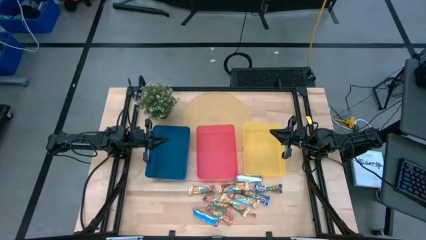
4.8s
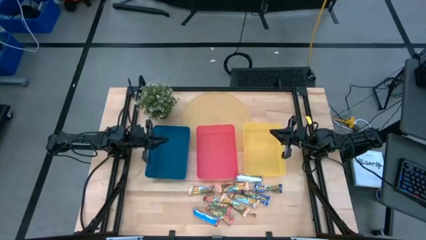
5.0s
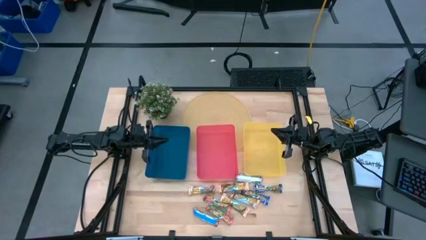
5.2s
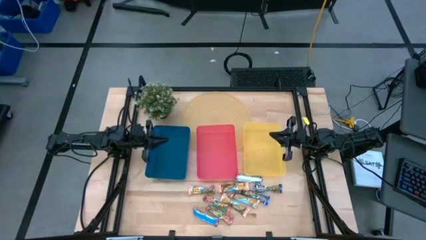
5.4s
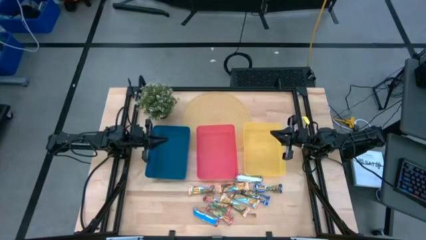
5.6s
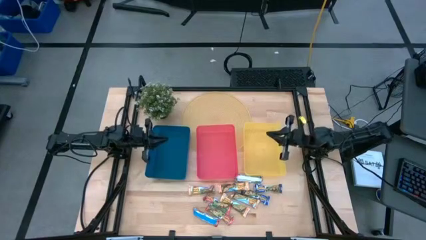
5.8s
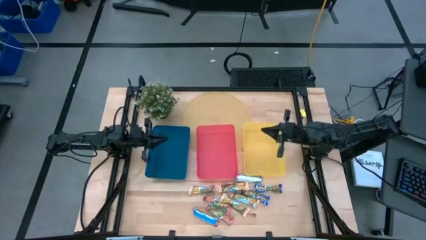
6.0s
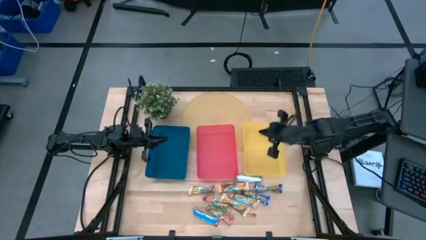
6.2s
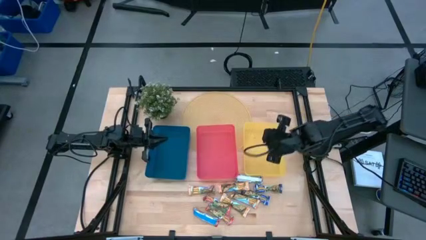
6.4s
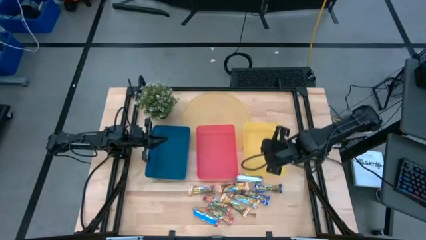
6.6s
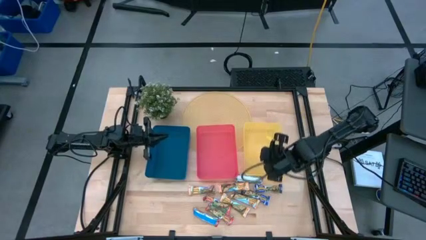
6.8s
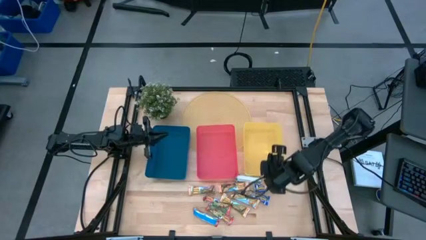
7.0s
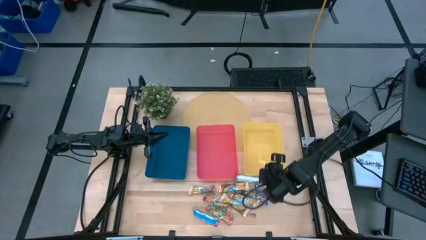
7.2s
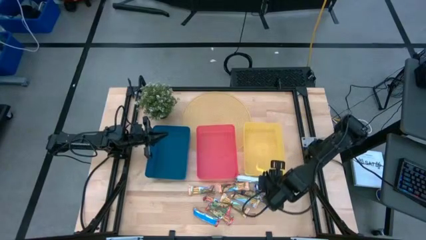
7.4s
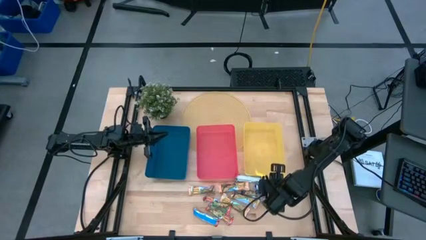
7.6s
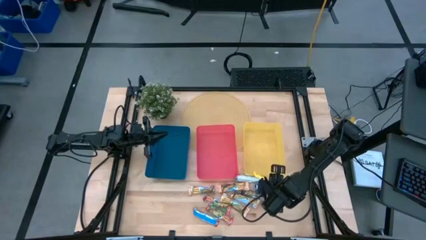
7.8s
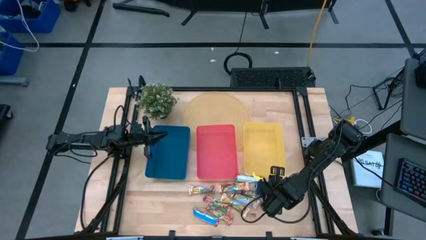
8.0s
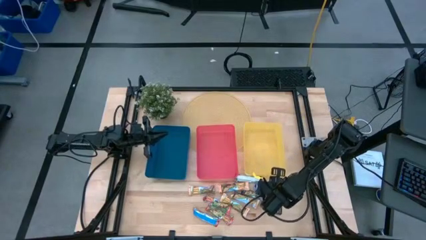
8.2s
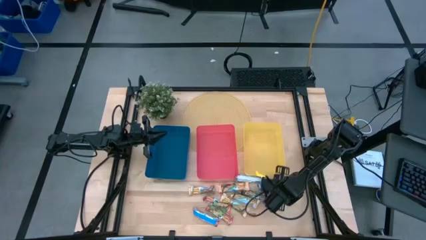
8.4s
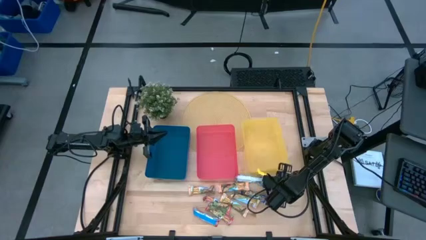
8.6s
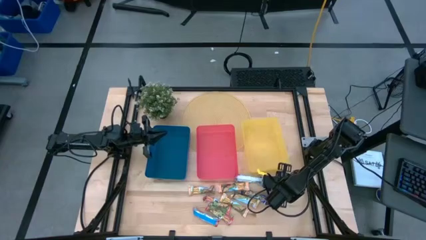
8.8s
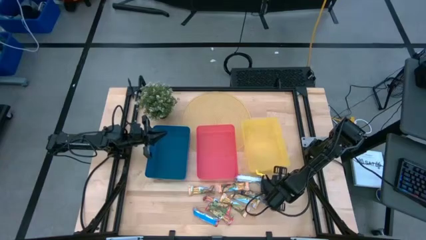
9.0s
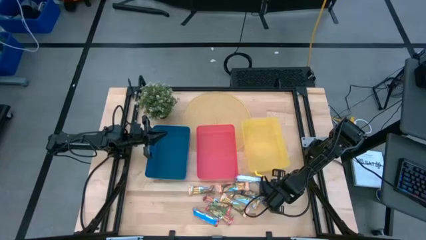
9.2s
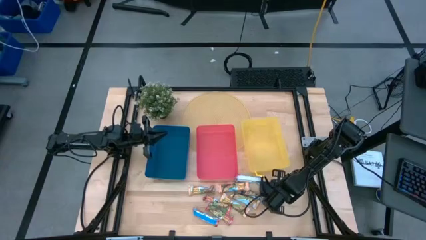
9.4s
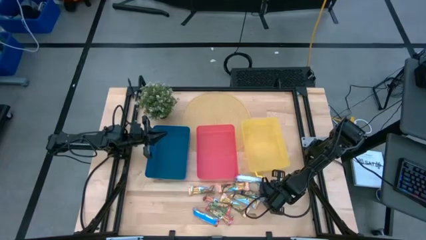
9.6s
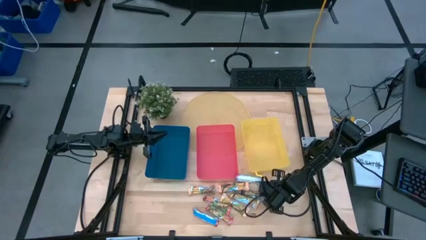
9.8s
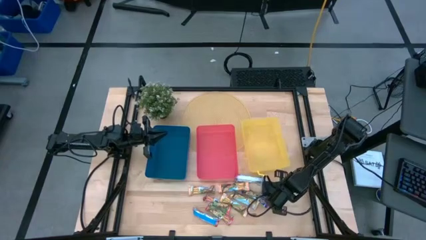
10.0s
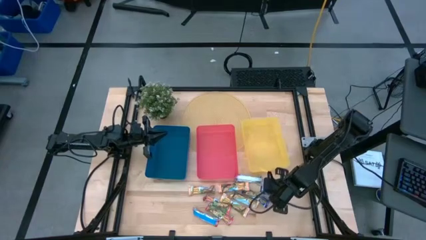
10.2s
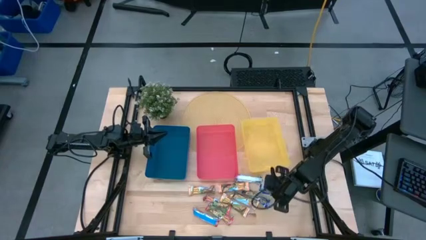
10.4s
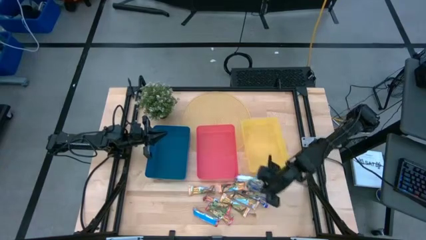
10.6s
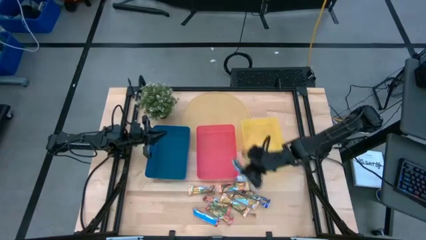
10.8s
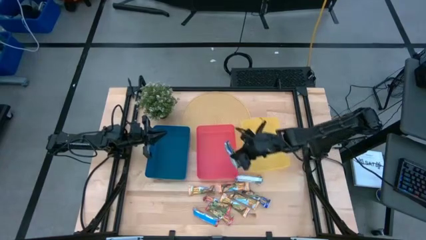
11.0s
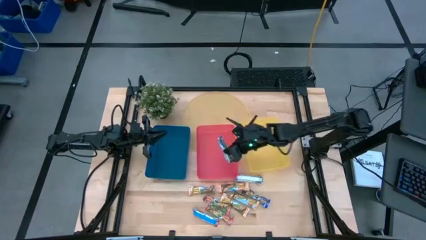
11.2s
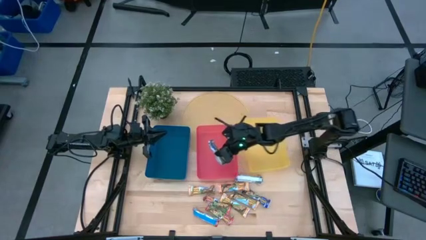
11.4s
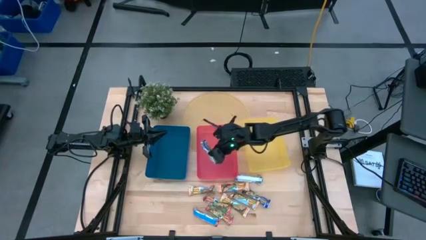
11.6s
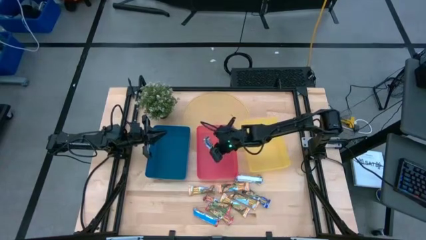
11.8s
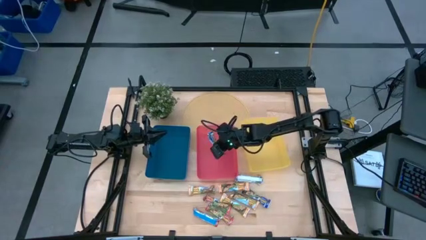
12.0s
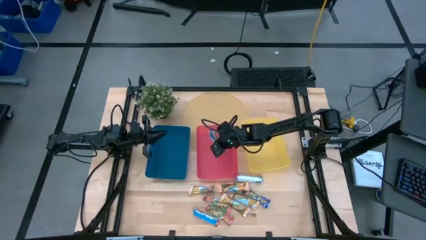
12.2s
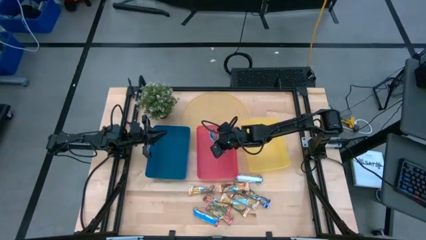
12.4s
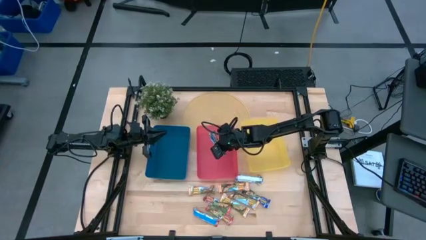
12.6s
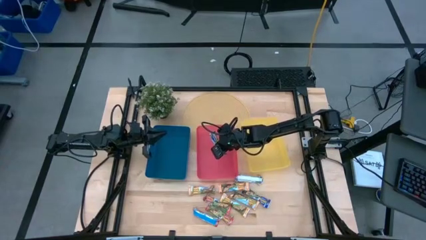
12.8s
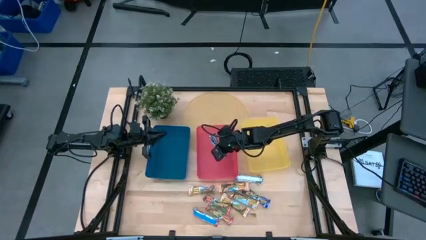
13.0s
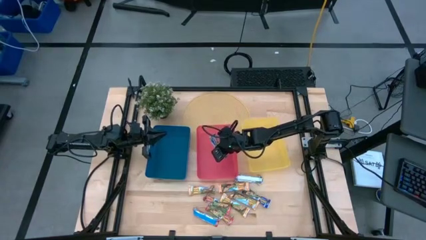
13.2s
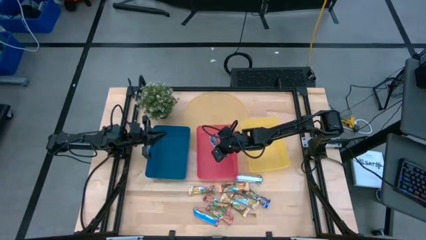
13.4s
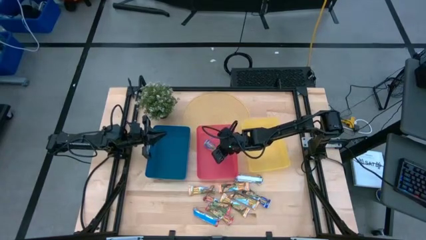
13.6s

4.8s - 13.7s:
Task: Pick and place Granola Bars by type
Put the blue granola bar into the red bin

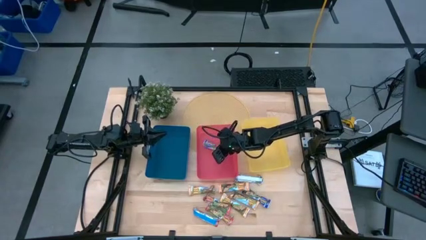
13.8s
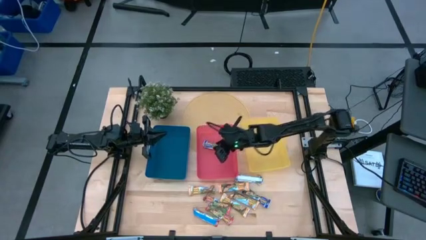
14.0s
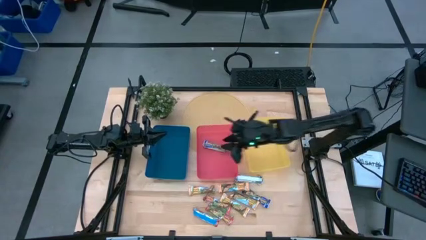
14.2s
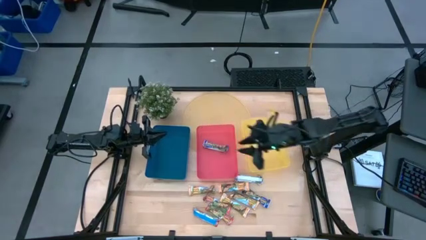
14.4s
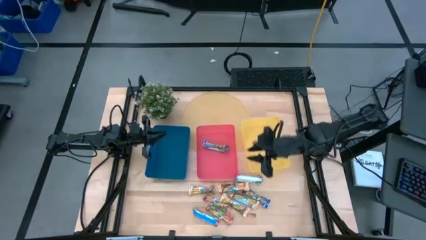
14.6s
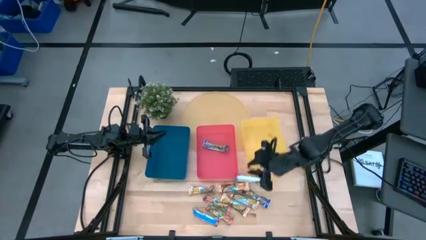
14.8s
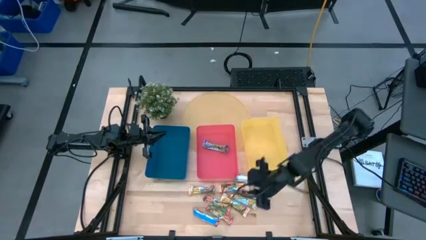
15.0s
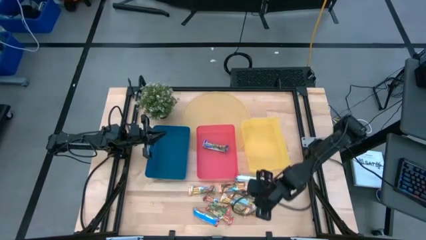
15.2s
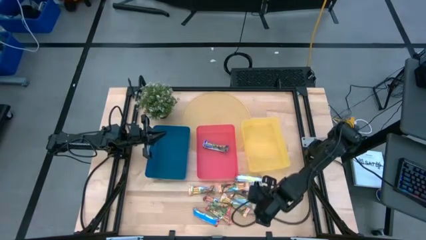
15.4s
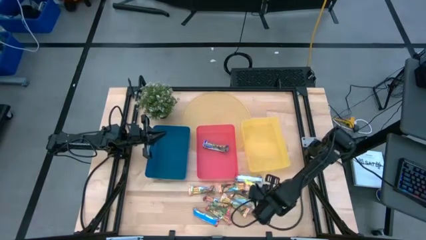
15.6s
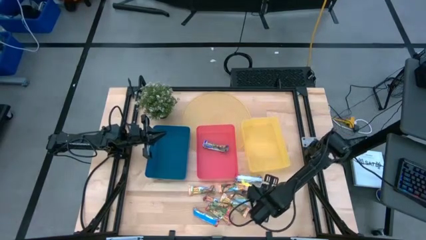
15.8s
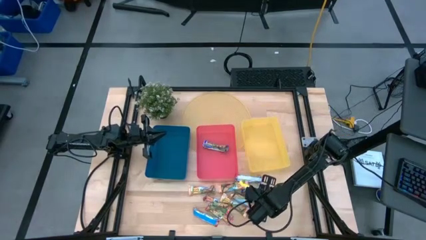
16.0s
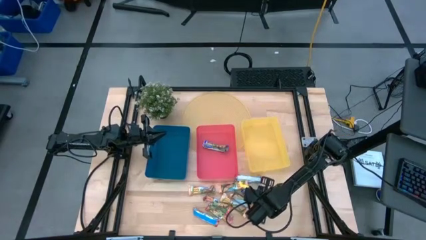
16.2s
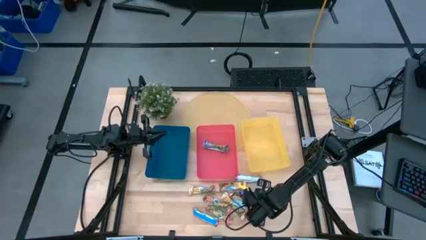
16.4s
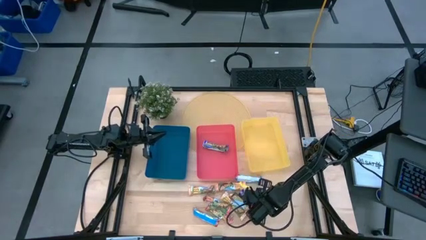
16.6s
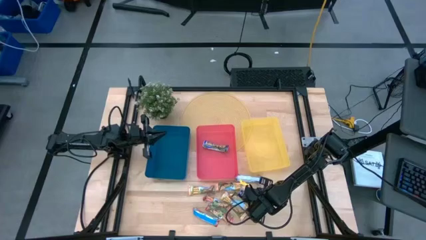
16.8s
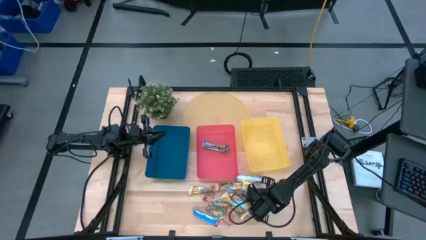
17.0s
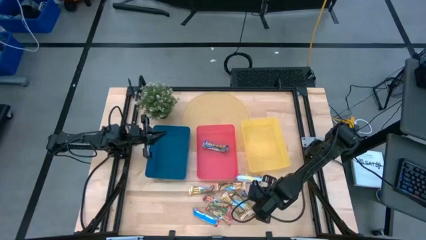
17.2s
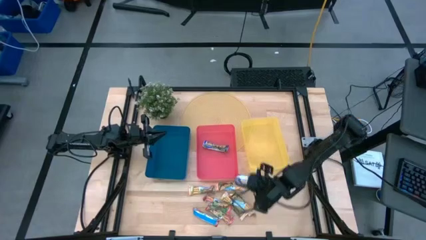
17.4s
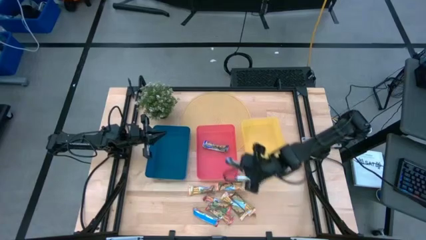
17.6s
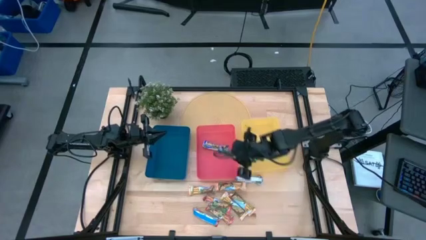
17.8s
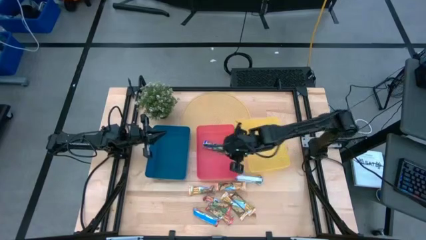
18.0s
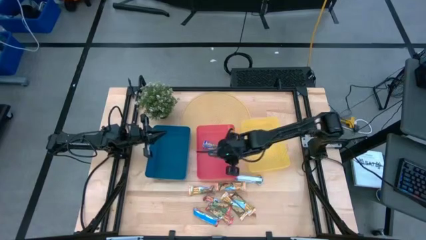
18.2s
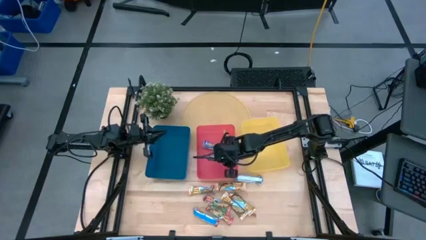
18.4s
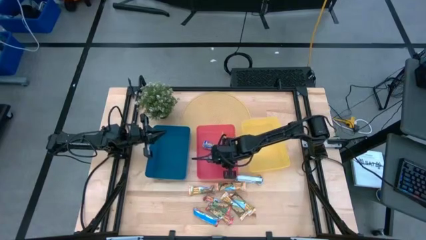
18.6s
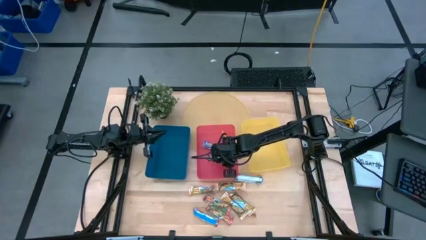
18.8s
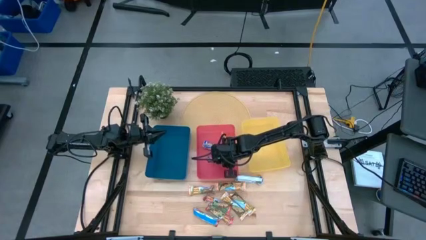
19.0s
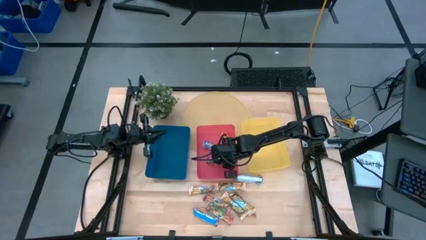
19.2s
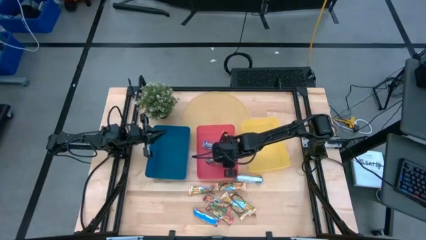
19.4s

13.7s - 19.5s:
Put the blue granola bar into the red bin

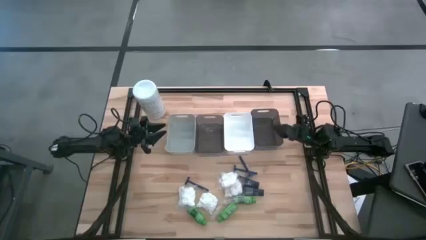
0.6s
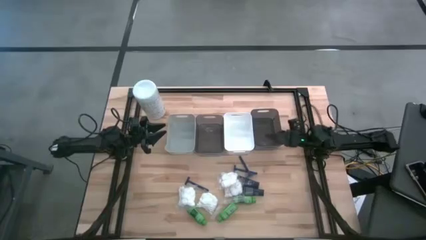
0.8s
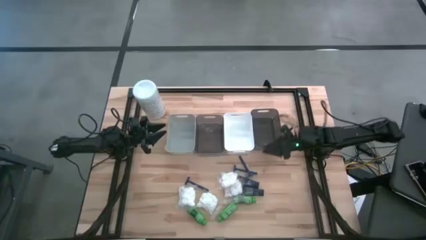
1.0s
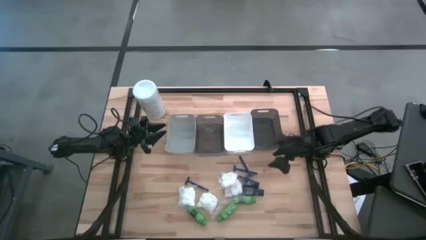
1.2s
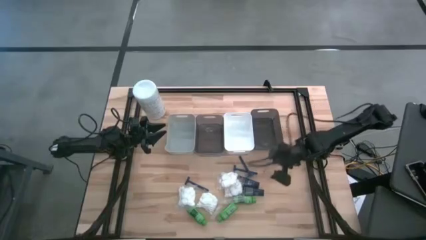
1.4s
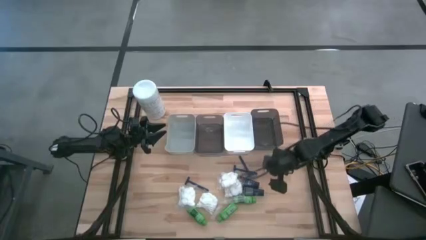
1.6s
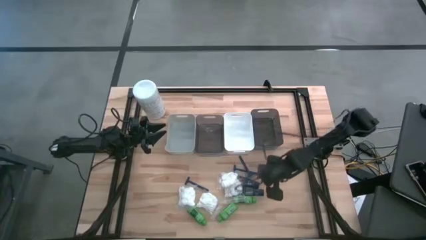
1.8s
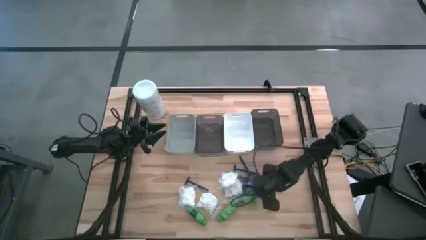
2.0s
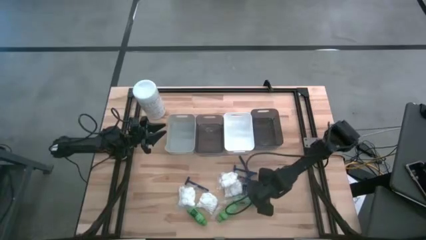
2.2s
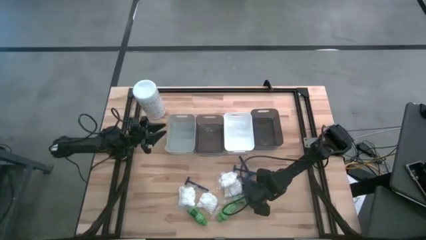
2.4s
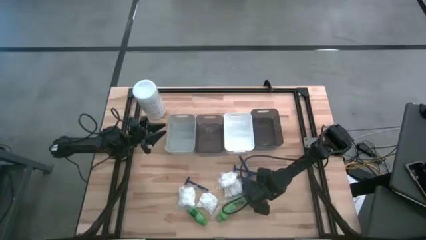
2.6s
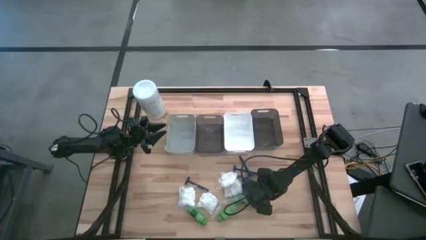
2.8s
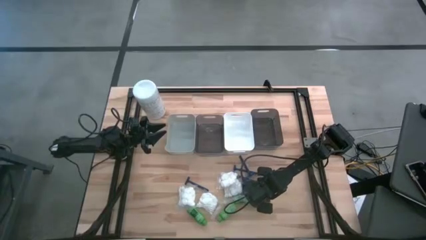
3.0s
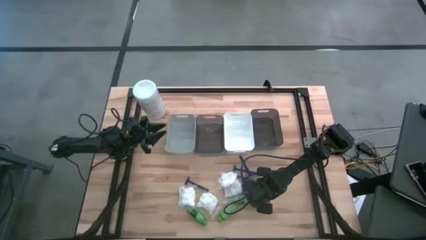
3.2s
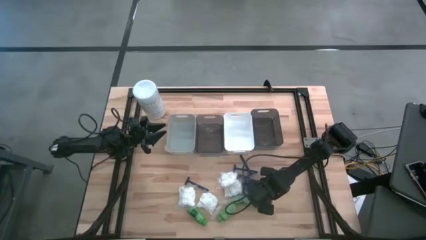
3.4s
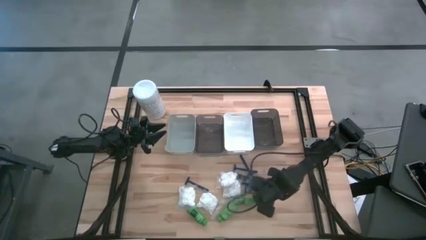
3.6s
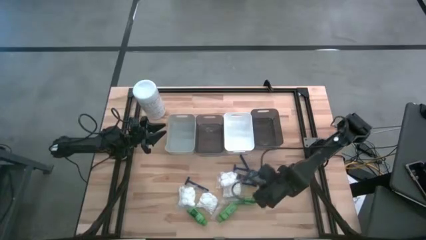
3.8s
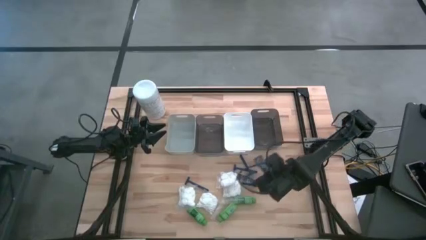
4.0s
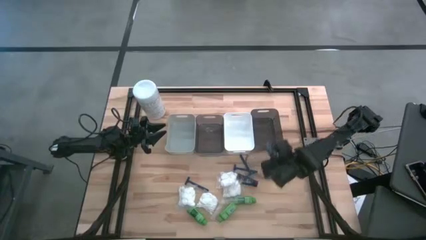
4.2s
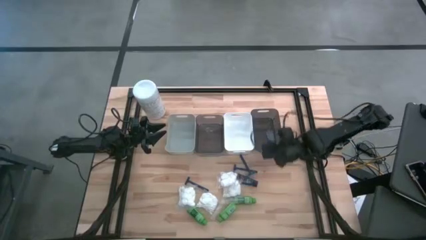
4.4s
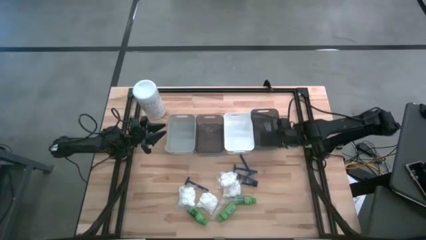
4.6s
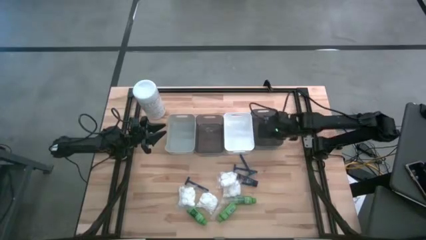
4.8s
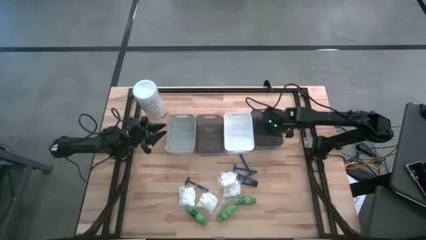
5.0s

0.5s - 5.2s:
Task: Pick & Place Travel size toiletries
Put the dark blue shaving cream into the right black bin
